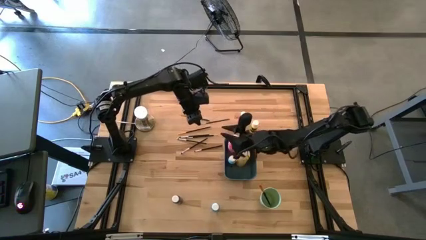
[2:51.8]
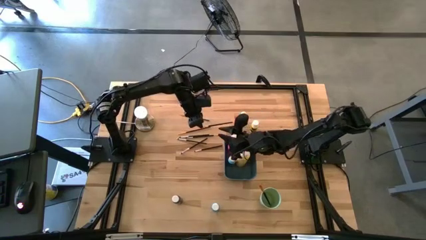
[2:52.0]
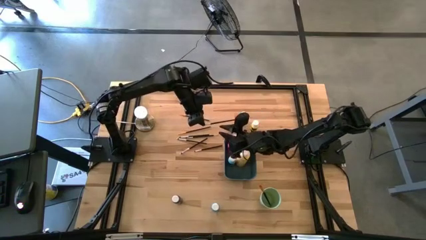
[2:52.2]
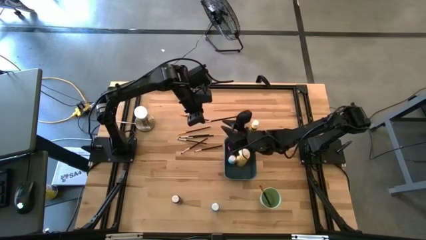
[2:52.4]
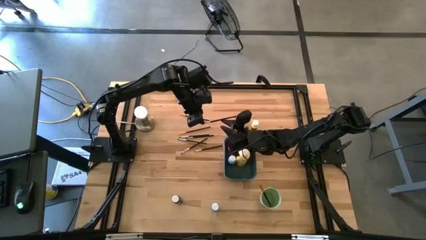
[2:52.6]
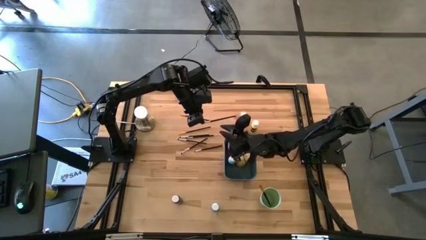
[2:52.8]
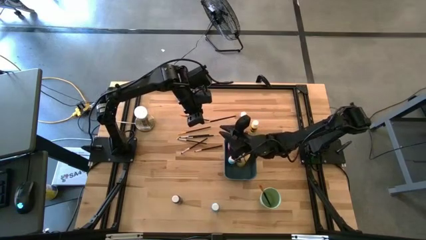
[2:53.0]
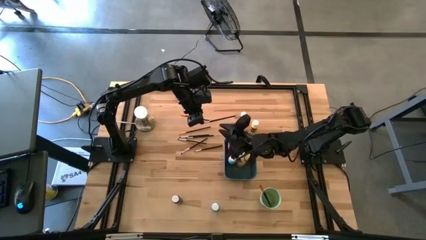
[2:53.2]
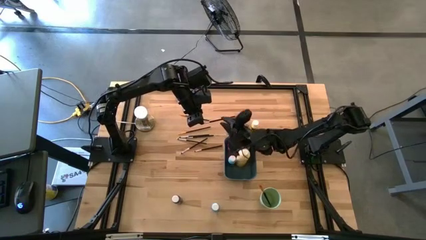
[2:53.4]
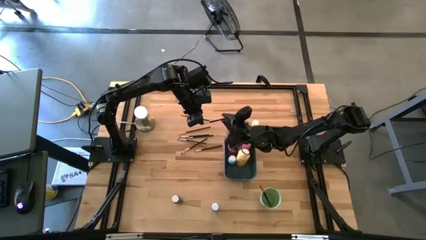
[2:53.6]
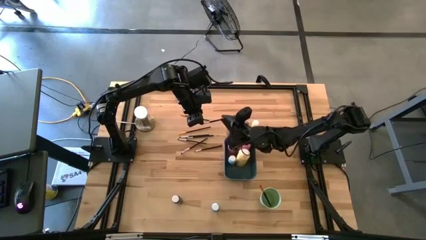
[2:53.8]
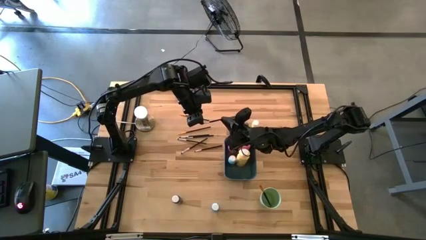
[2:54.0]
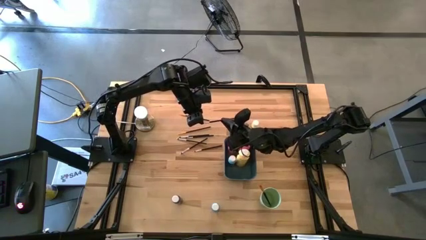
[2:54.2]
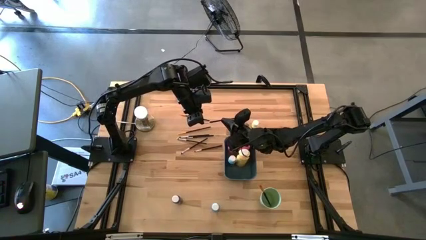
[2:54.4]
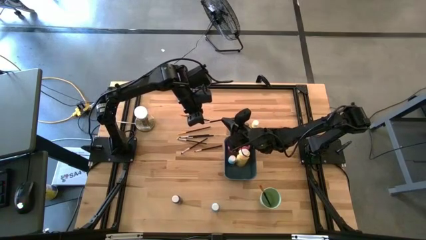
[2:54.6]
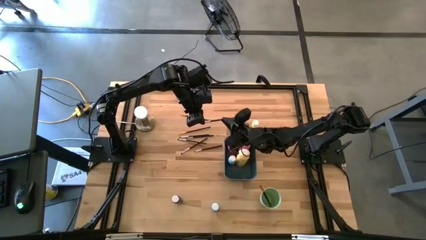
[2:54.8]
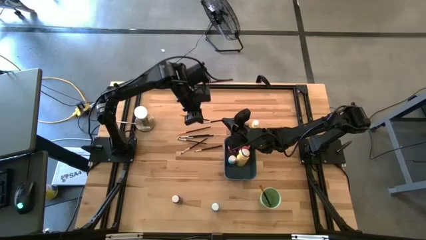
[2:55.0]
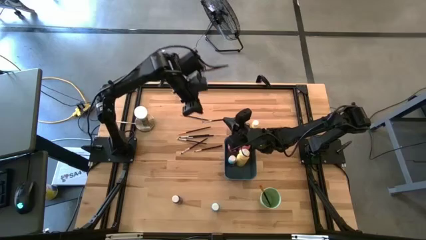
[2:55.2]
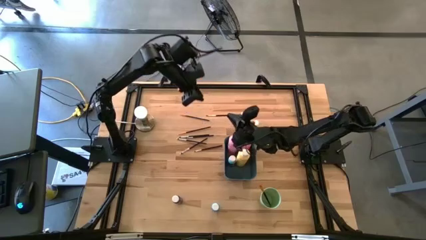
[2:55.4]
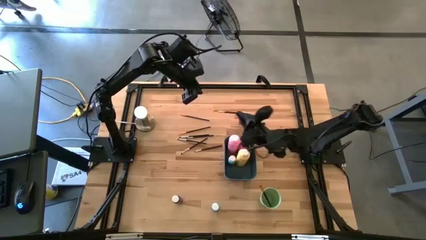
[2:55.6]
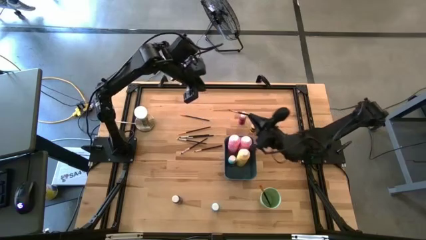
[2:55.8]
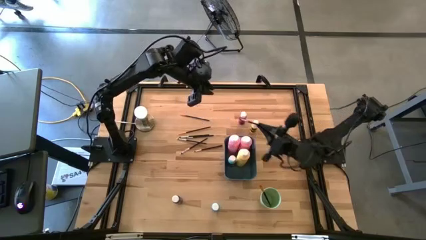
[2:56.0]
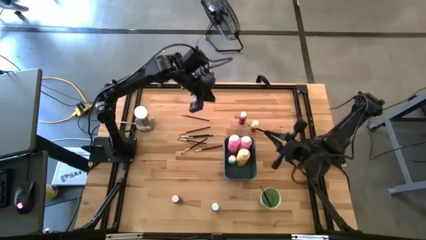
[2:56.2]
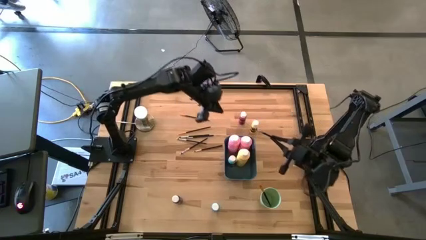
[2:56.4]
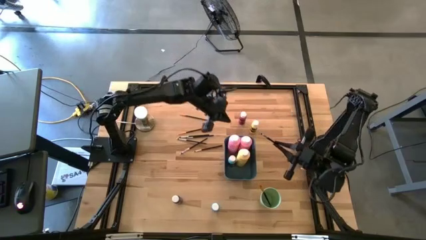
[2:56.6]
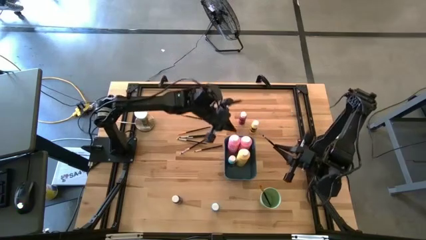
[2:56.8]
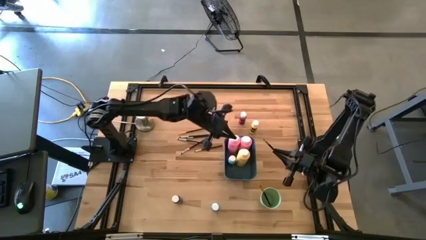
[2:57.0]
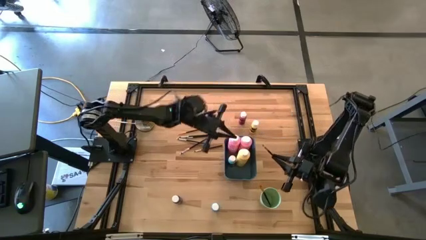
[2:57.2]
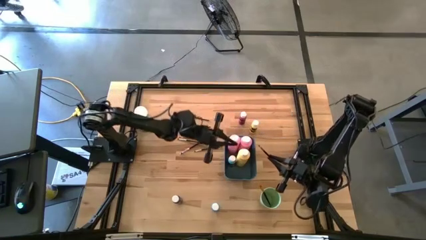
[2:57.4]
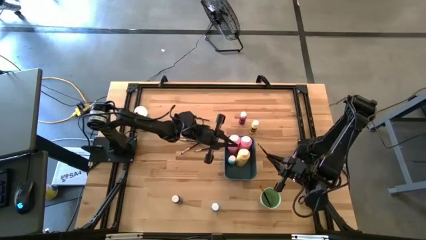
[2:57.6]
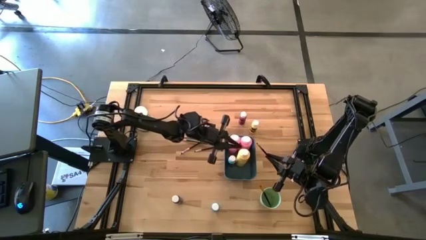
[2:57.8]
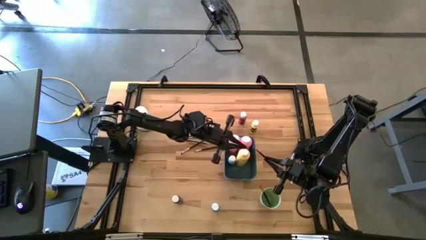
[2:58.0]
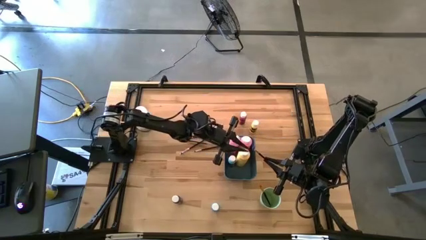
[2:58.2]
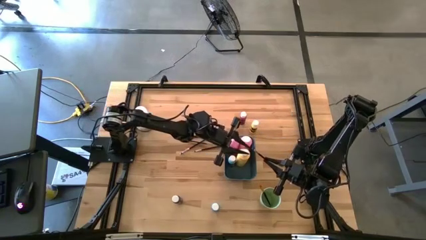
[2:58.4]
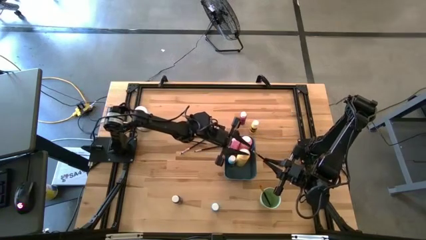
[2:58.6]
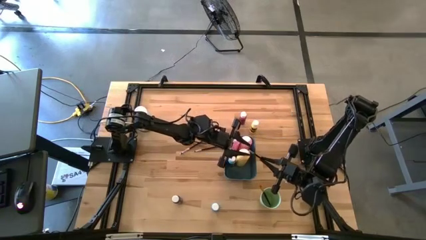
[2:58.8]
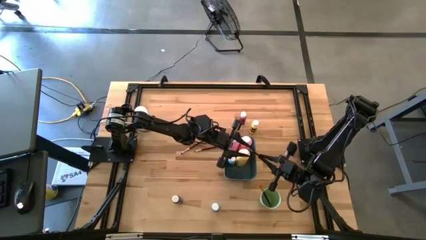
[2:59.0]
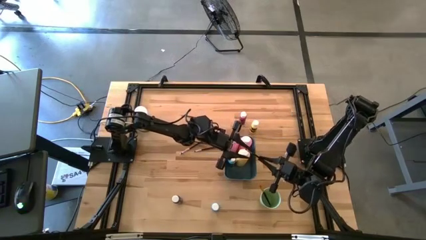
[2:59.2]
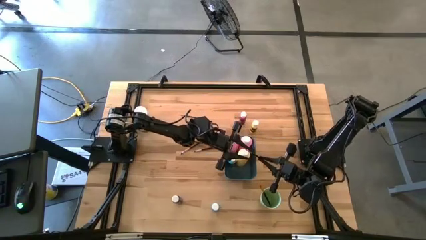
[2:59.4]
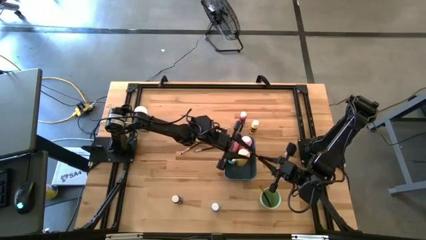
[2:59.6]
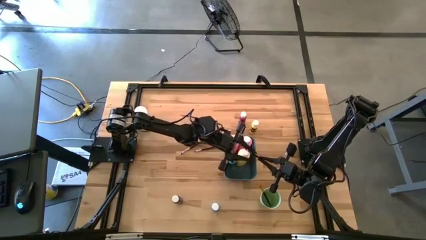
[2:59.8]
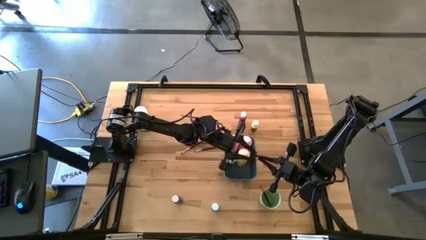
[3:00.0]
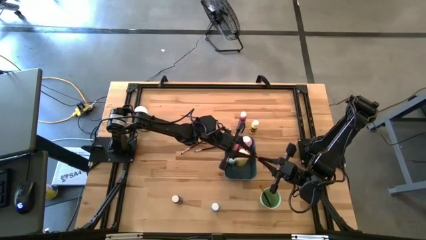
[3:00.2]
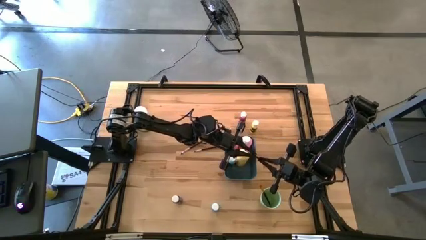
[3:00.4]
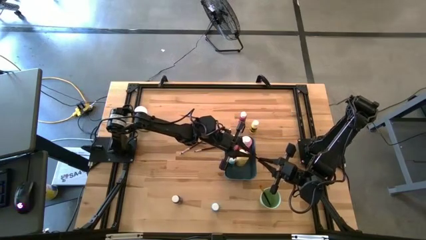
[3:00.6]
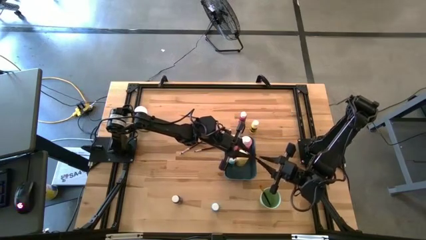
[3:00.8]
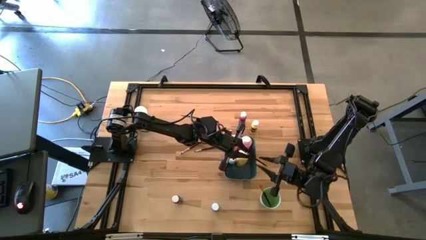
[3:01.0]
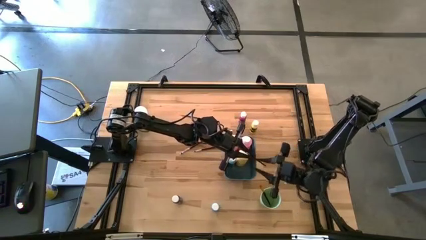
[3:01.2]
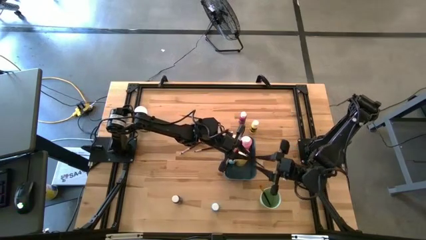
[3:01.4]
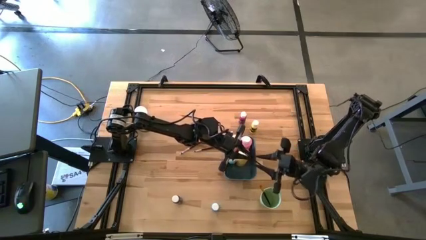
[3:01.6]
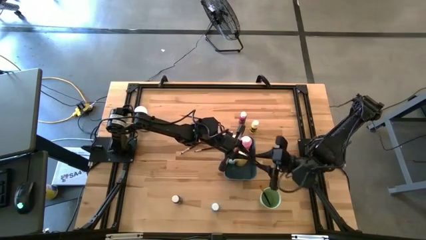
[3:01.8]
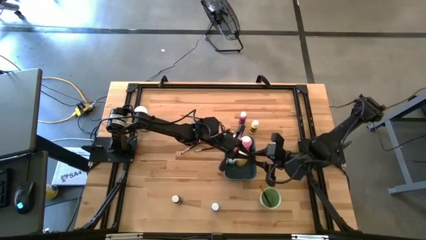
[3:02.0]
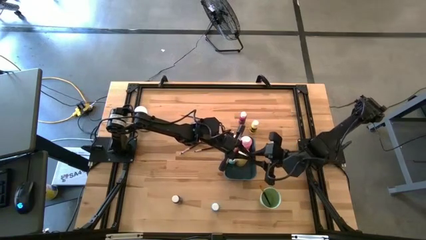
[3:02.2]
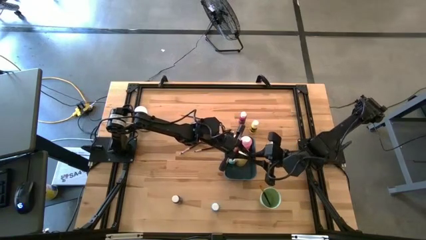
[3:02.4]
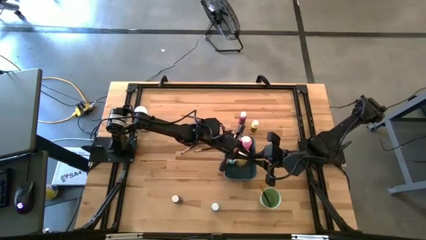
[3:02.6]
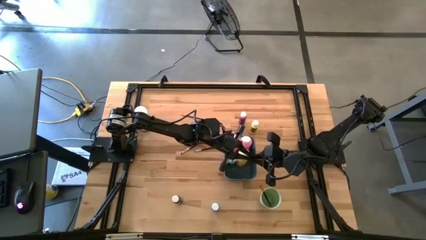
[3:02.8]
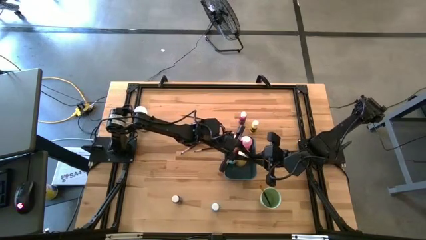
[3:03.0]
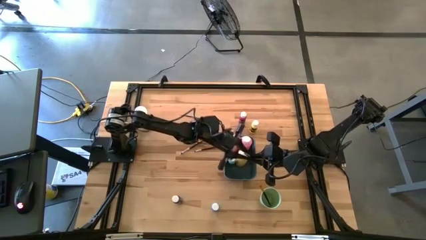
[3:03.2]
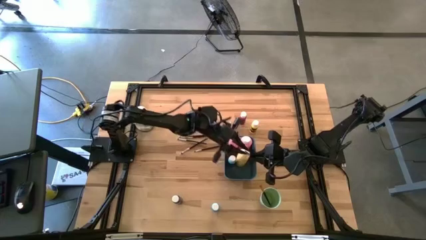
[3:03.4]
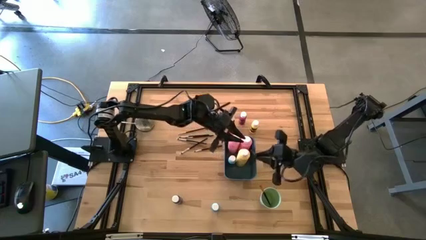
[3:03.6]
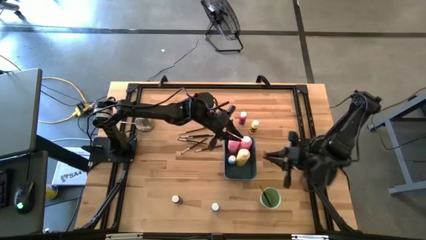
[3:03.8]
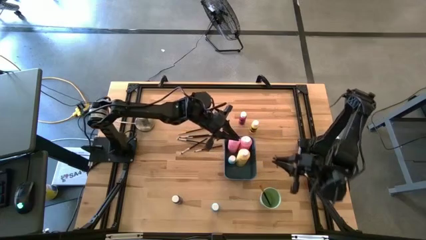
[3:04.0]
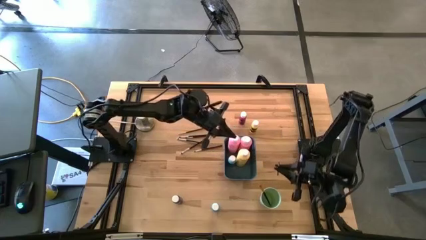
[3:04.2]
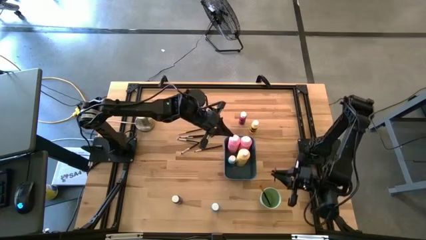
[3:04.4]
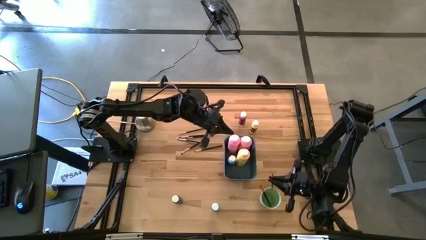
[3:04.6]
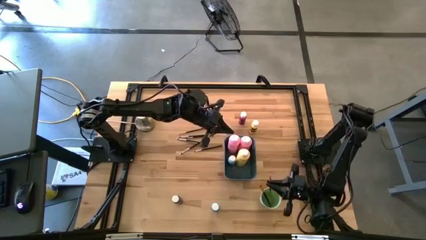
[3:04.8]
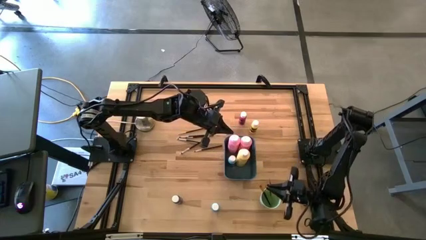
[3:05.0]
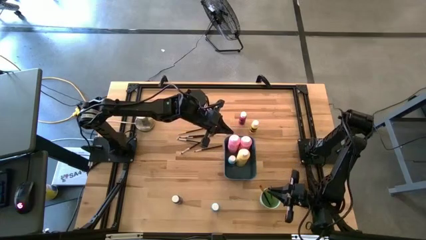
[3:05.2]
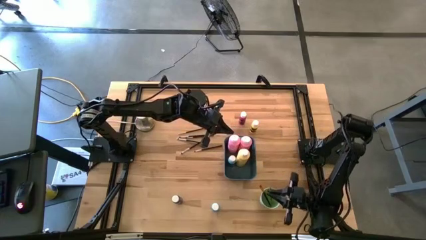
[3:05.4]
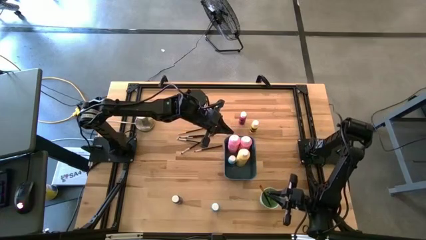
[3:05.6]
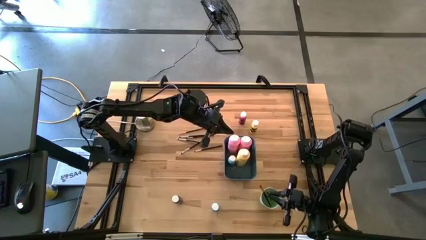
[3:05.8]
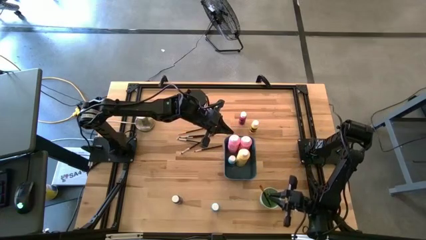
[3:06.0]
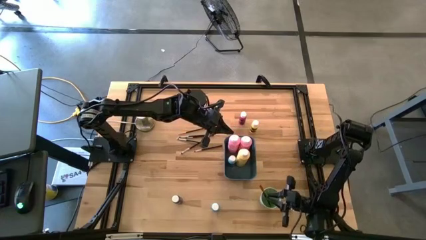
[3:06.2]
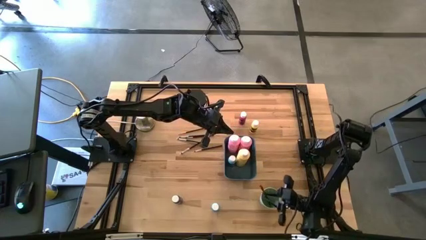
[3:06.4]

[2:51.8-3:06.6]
Task: Pick & Place Paint Supplies
Put the black and silver paint brush into the green cup

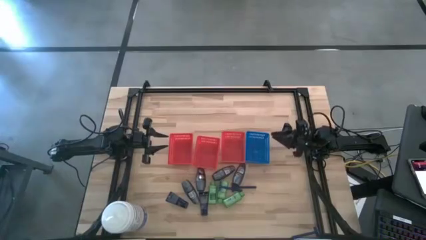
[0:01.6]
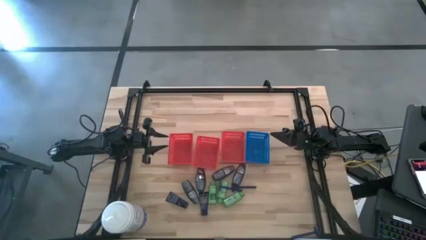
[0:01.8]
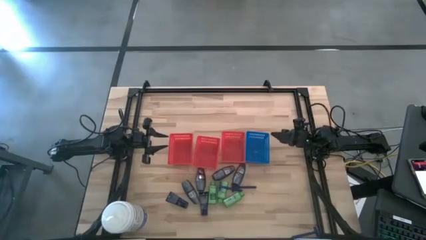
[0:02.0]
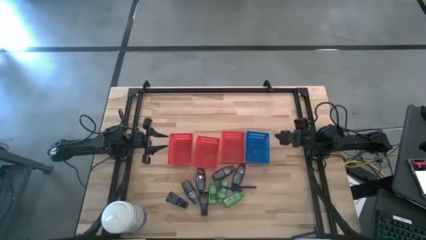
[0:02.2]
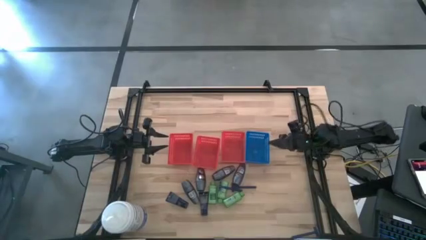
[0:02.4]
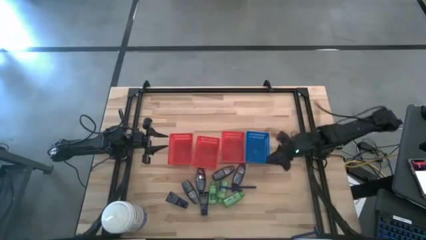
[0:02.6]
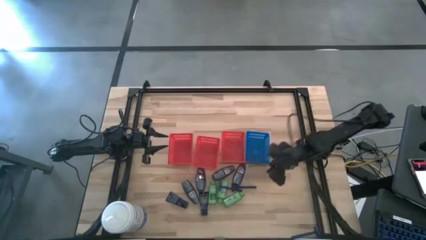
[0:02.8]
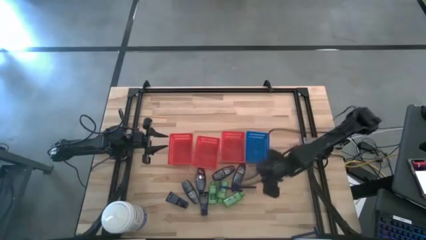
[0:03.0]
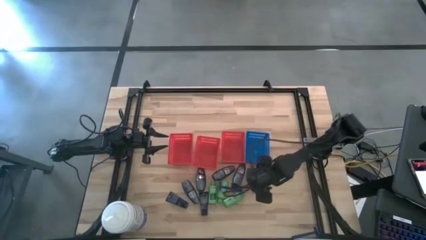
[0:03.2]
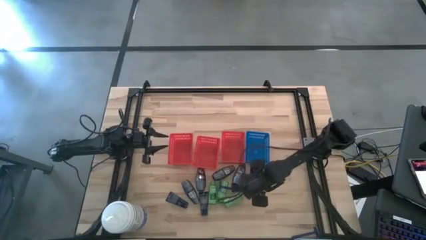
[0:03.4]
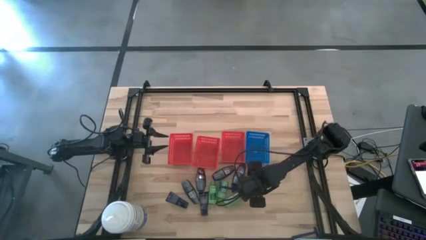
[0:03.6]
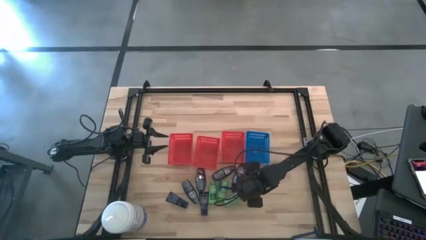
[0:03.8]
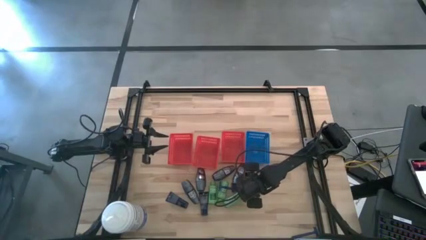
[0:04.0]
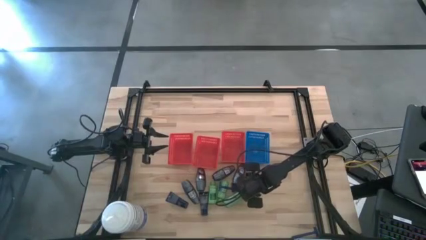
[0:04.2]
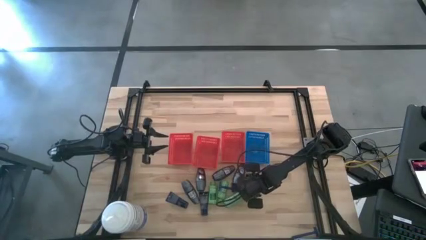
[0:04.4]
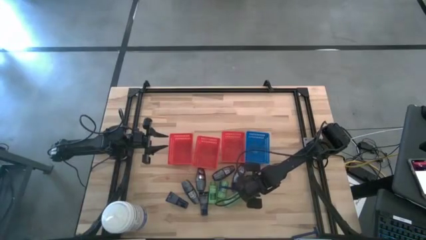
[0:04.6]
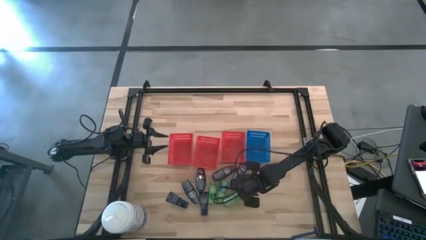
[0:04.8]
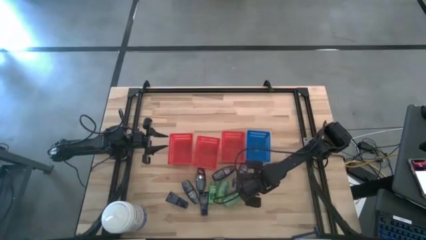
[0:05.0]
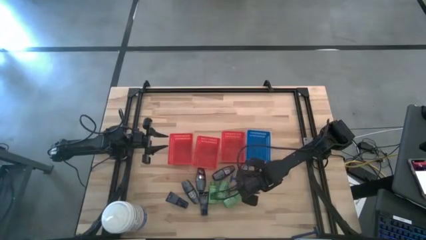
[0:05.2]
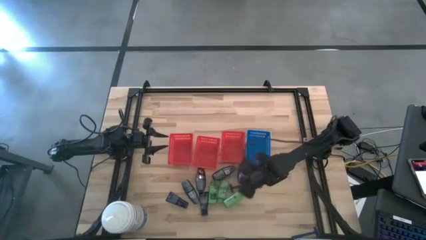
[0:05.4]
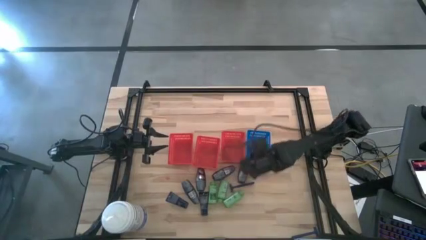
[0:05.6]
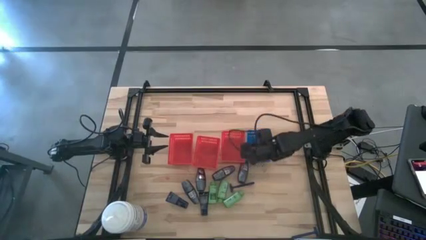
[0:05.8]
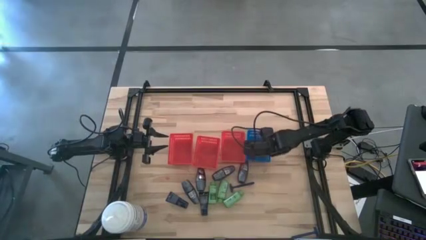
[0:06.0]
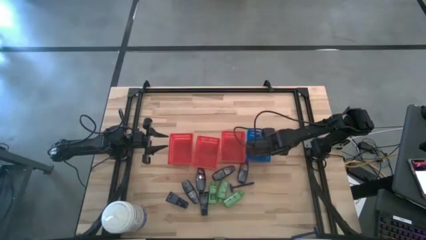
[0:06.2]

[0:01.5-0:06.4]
Task: Pick & Place Travel size toiletries
Put the razor into the blue bin
